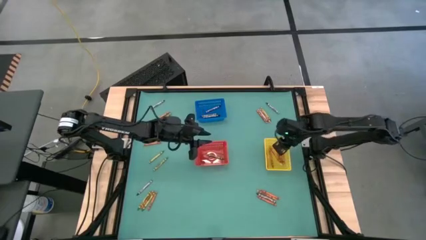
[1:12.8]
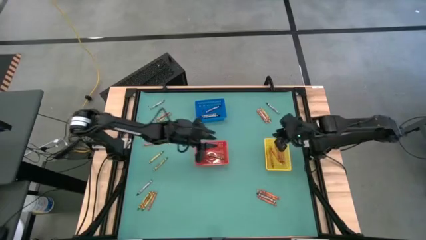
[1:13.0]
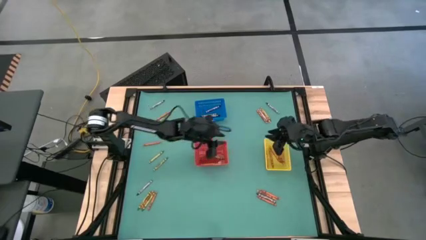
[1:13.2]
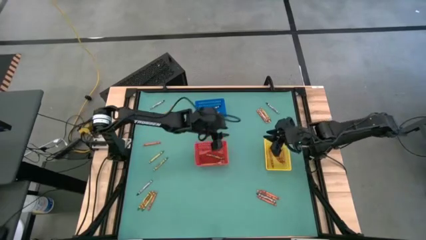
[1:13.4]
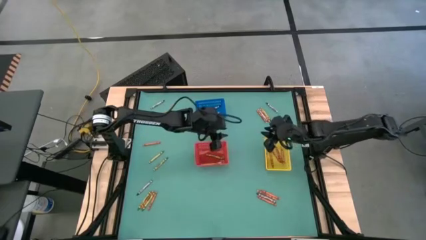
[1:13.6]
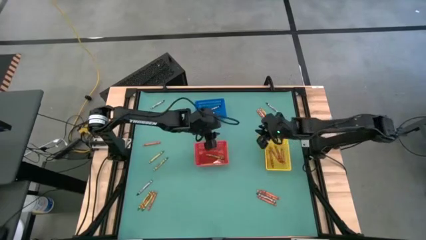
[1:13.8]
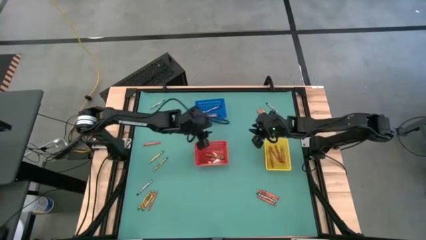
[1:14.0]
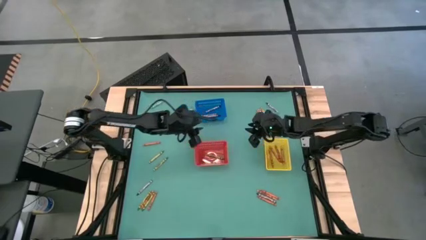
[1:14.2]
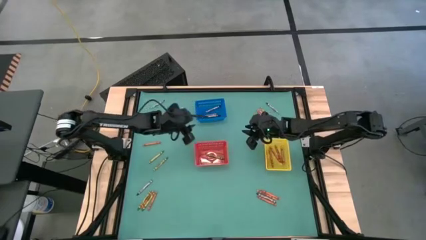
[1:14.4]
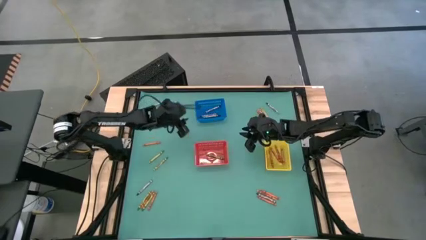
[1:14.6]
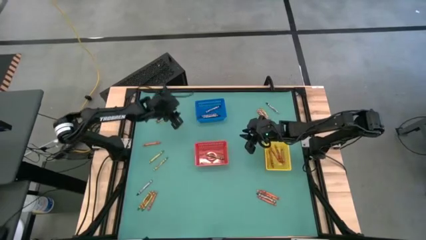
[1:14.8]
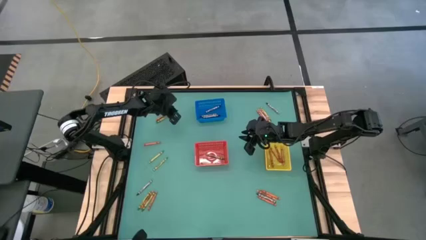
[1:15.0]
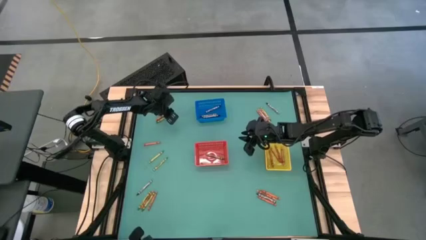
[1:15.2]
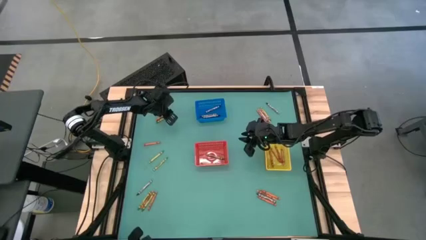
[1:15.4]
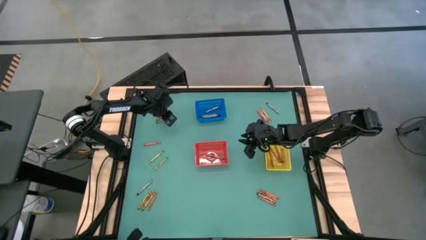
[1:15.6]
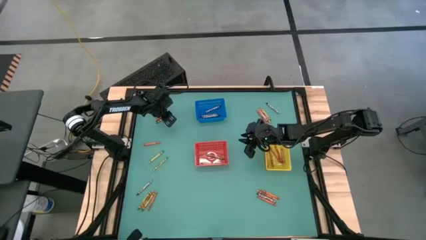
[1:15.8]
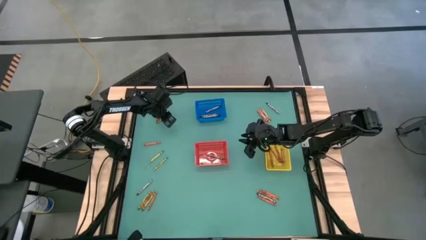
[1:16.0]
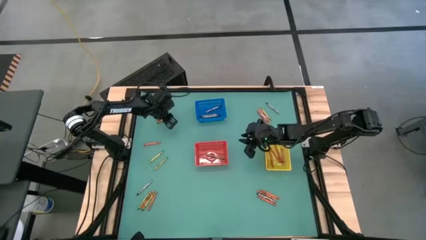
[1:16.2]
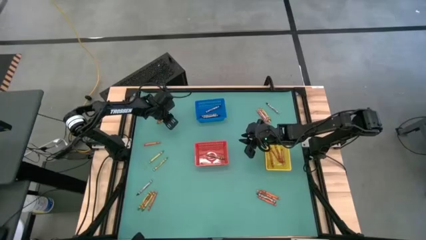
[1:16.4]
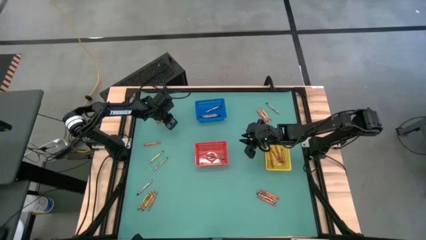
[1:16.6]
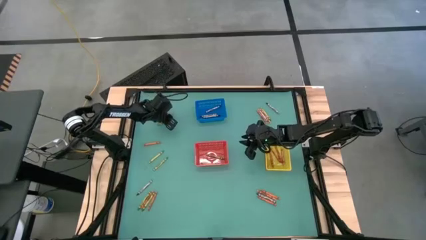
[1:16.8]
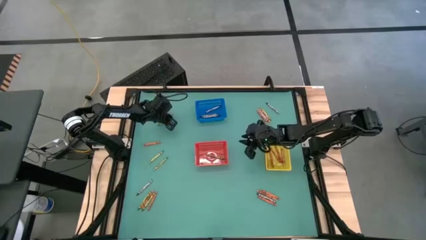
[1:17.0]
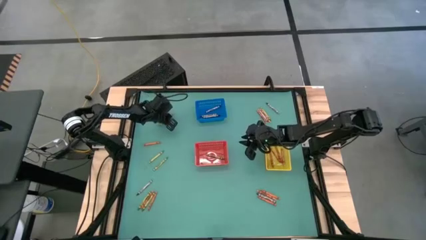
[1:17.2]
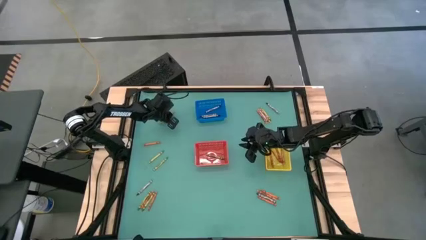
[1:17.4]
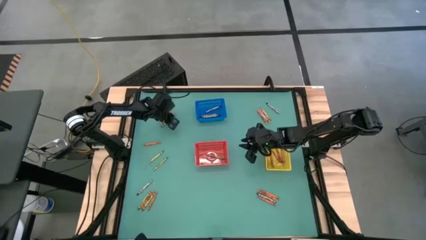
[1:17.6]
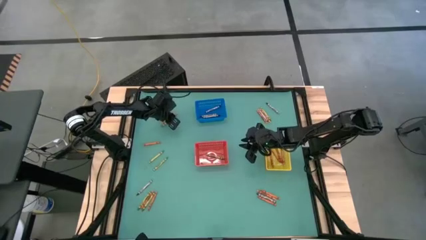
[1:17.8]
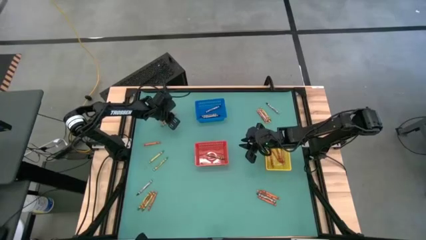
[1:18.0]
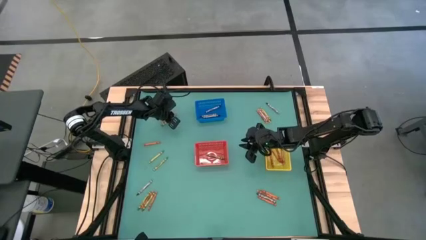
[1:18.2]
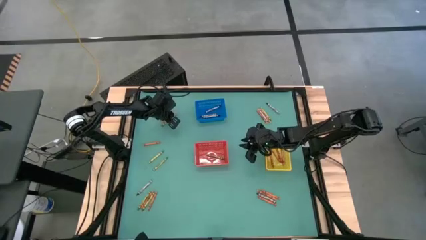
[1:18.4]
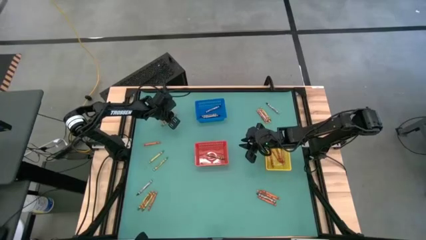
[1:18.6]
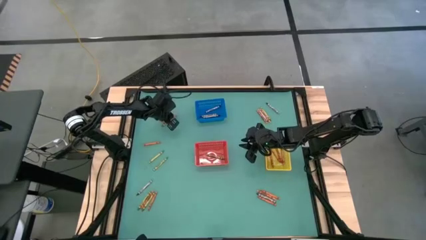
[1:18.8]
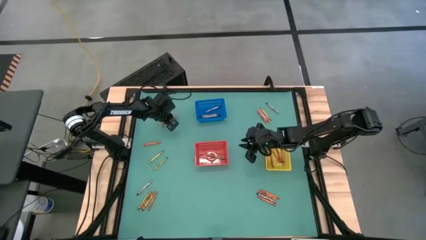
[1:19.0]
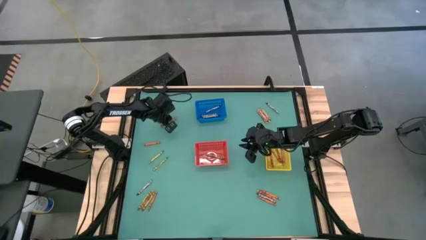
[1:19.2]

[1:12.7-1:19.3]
Task: Sort crayons
Put the orange crayon into the yellow bin

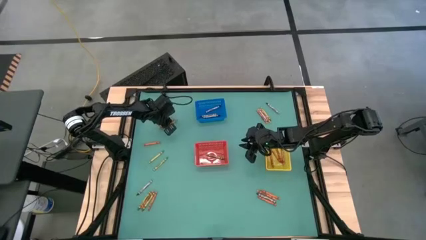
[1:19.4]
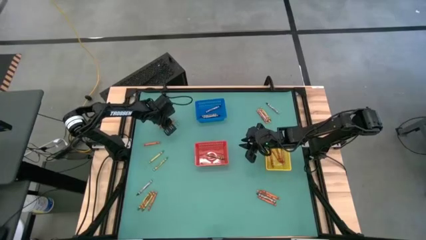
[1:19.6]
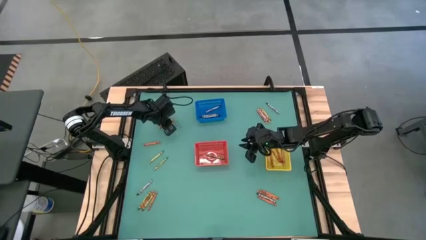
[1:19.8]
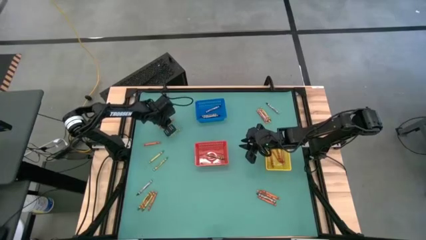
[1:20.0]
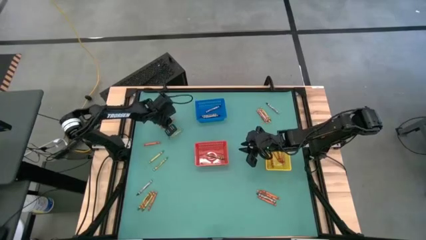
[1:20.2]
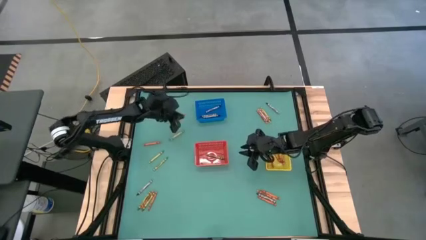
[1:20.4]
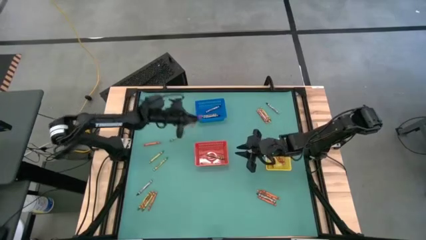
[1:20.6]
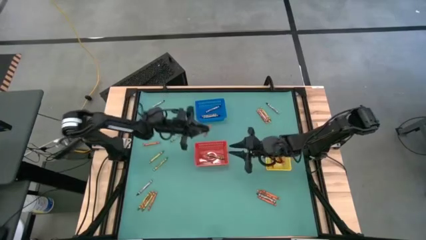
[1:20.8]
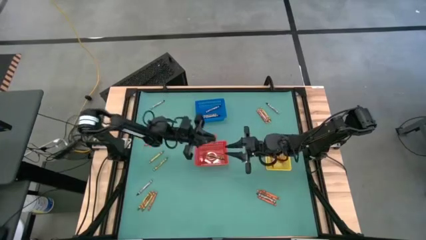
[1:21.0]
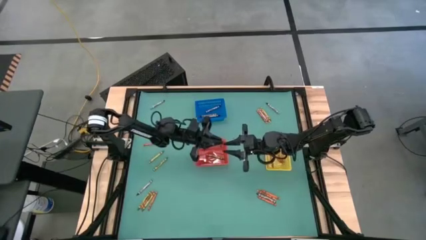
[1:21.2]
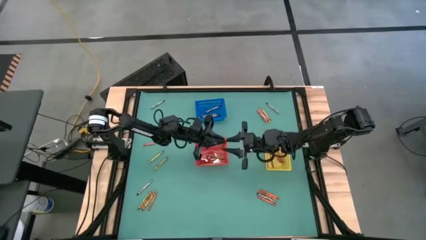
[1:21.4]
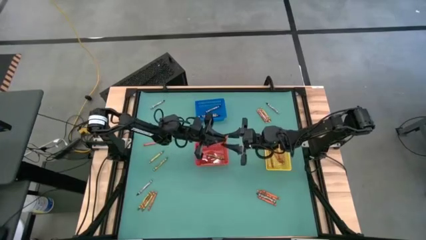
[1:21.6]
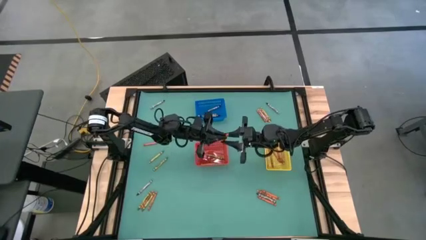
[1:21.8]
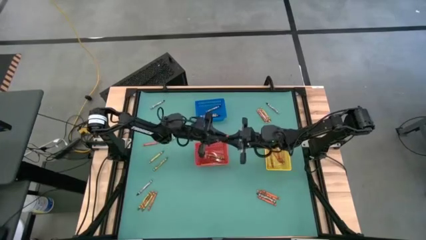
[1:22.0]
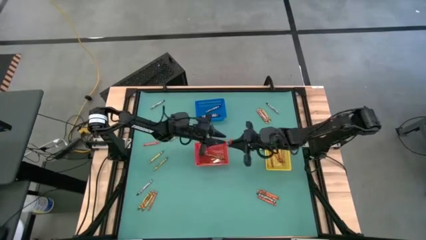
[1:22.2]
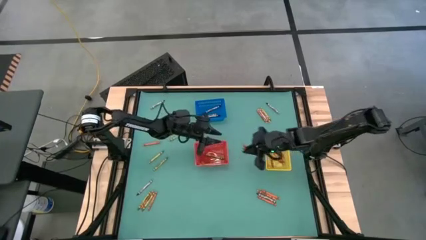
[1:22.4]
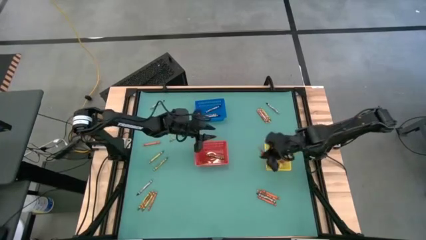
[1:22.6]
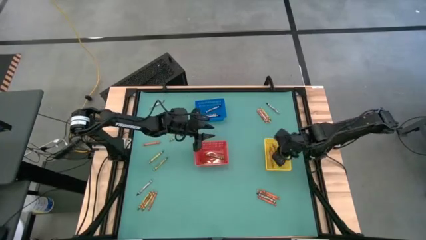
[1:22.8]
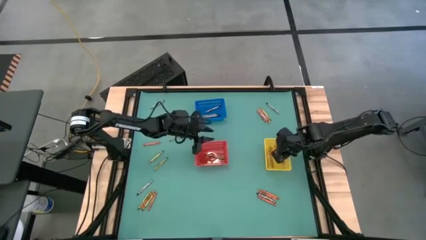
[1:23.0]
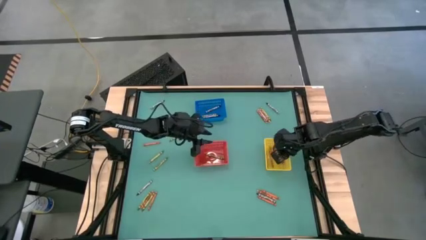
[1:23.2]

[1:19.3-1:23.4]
Put the orange crayon into the yellow bin

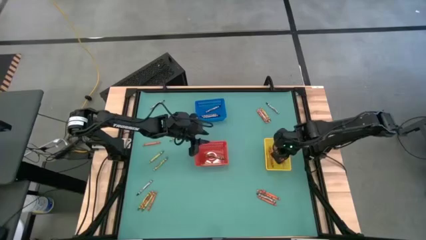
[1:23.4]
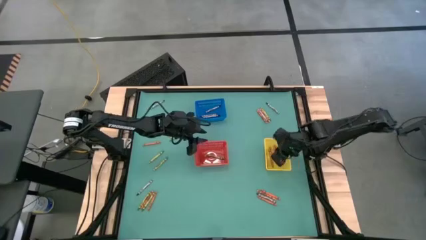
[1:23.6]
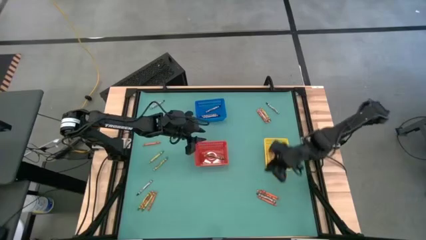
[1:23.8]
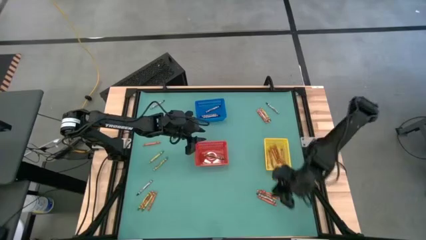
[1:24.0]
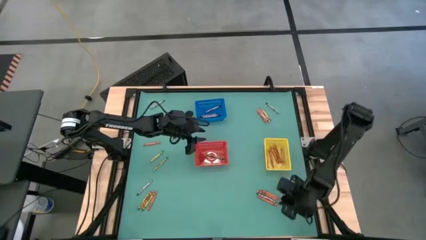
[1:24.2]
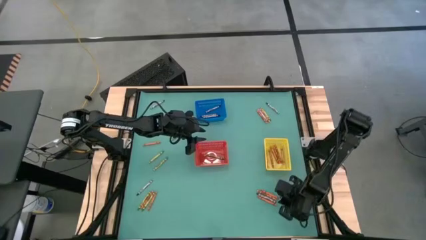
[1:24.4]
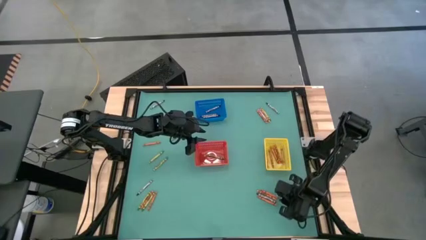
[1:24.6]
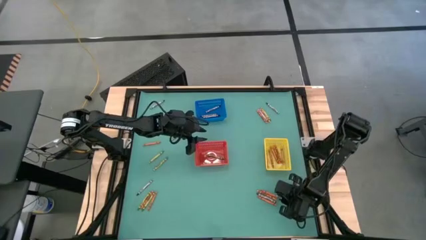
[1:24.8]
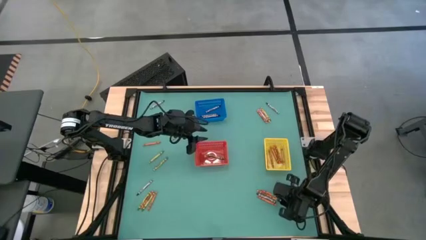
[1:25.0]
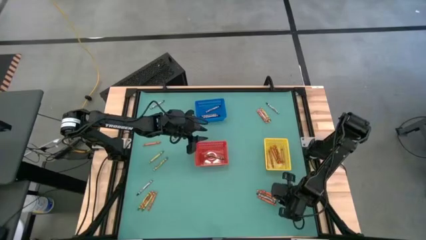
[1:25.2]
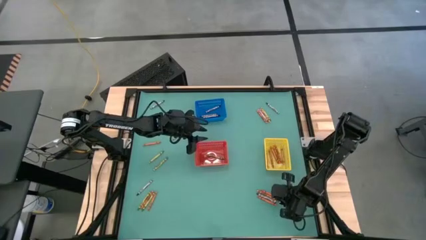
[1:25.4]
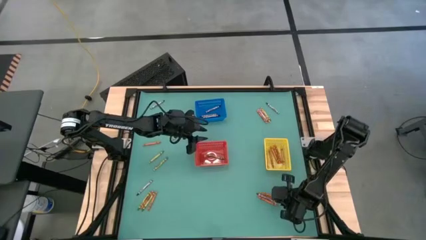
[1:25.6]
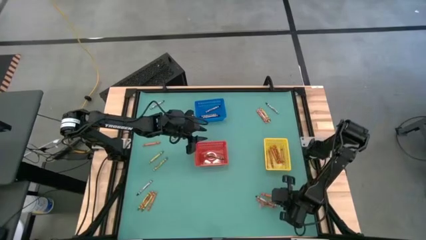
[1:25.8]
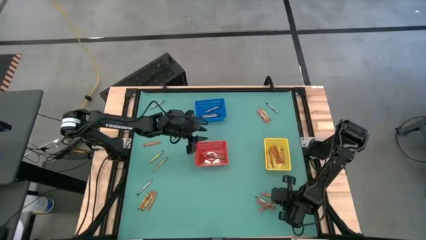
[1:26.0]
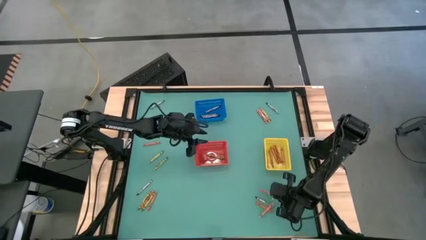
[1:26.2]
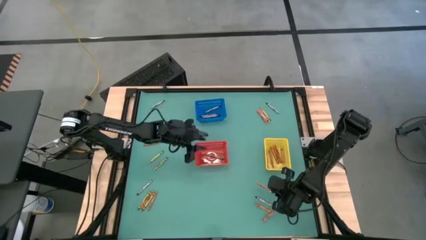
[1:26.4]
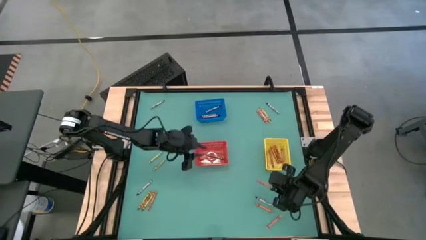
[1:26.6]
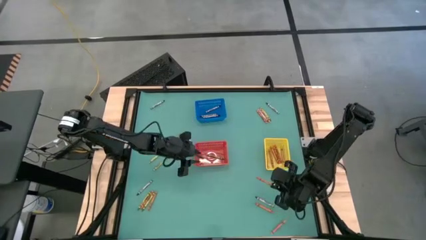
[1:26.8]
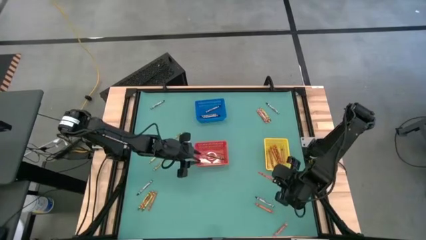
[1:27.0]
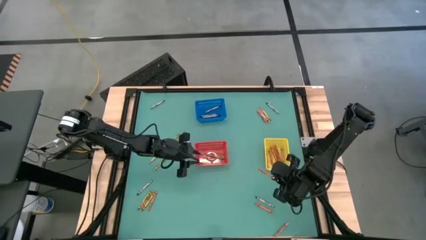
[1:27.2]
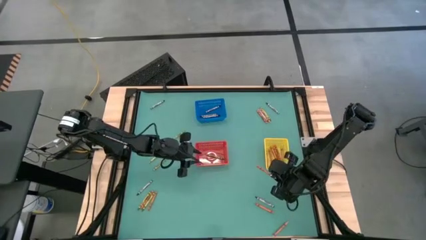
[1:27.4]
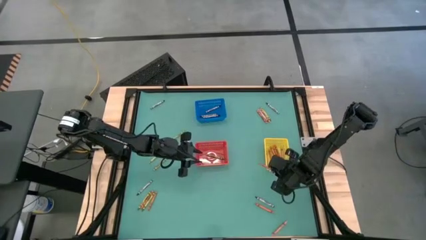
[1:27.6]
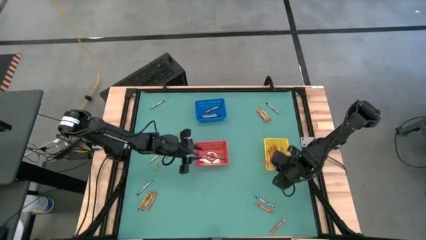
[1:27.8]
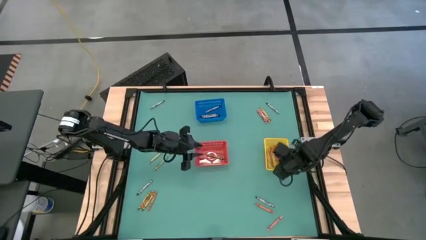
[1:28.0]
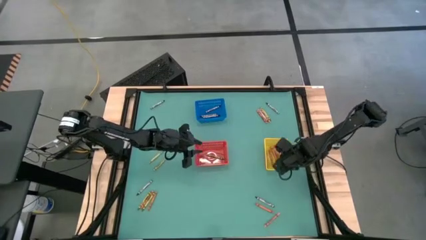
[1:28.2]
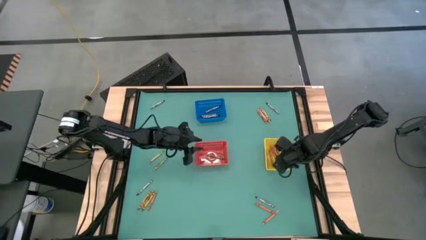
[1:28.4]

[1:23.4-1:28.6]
Put the orange crayon into the yellow bin

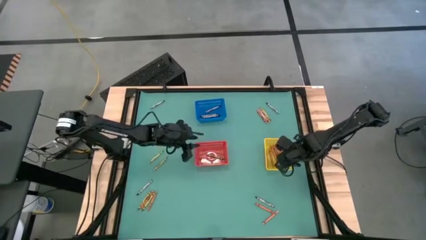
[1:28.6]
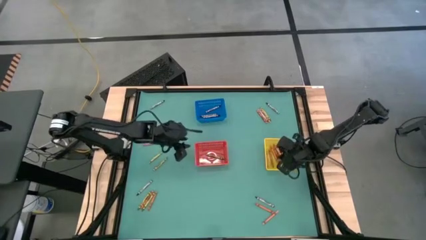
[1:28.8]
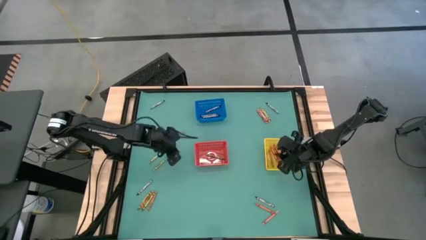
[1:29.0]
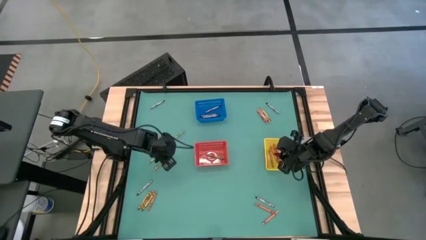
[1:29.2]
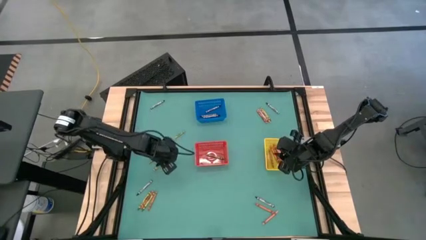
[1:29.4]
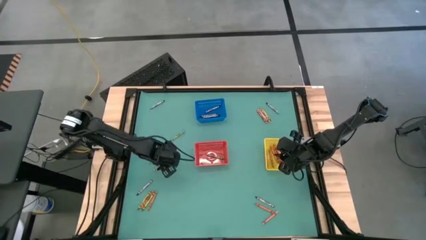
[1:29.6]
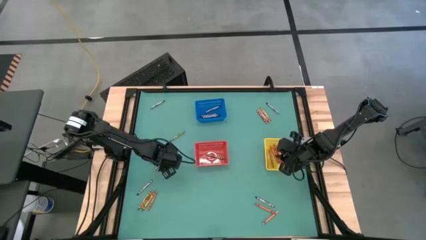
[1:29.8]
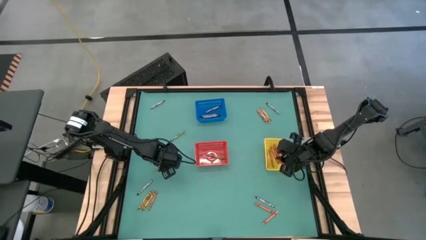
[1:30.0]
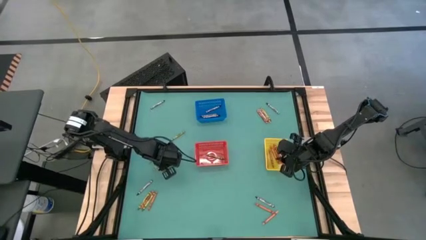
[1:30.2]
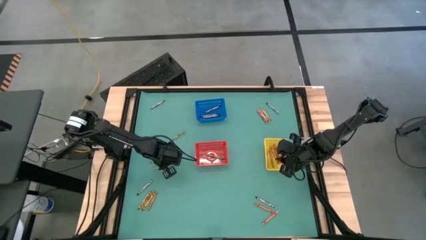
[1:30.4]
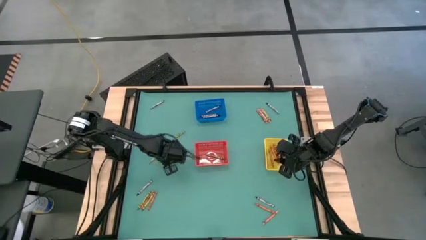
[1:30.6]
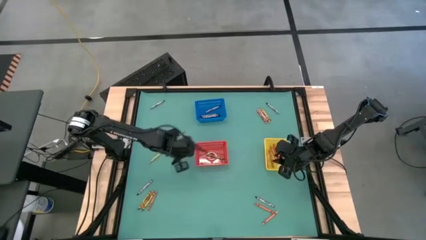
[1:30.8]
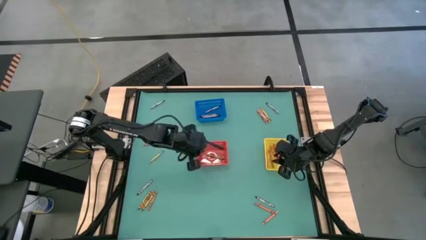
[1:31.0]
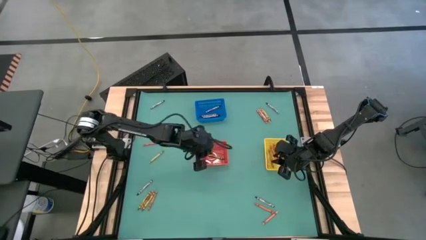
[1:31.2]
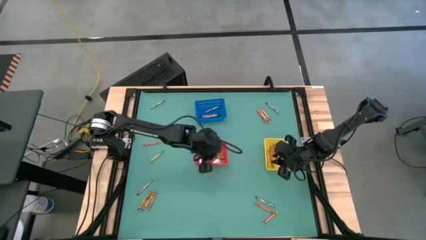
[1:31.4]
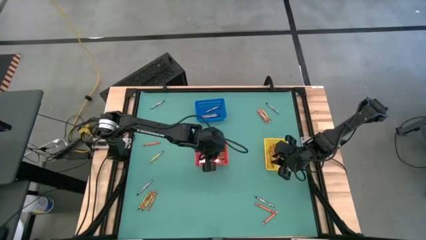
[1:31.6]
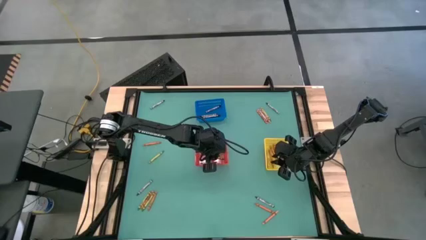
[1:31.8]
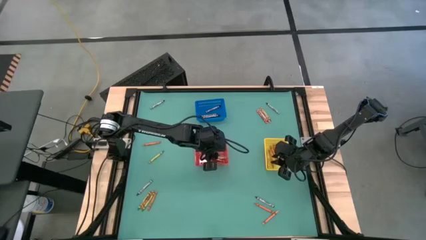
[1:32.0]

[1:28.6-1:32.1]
Put the green crayon into the red bin
